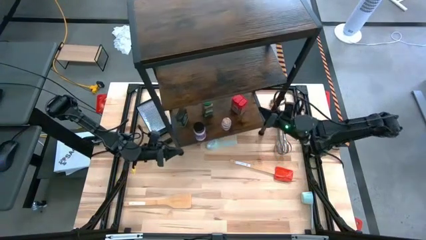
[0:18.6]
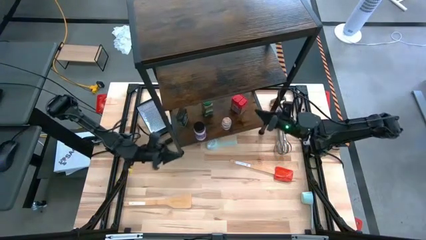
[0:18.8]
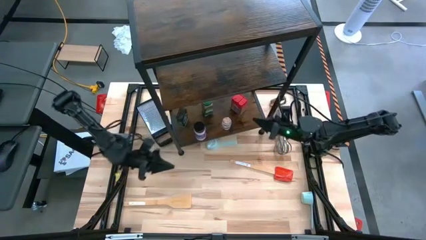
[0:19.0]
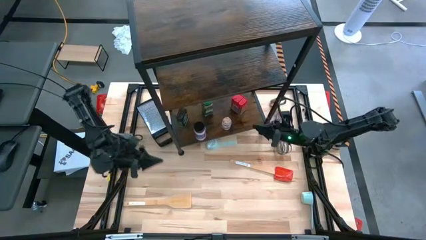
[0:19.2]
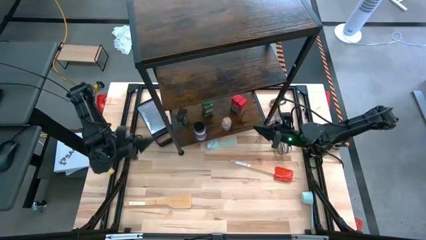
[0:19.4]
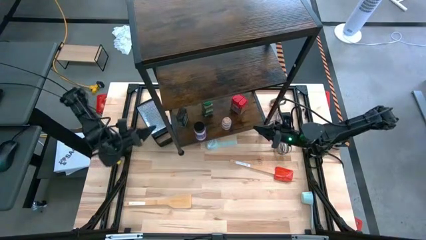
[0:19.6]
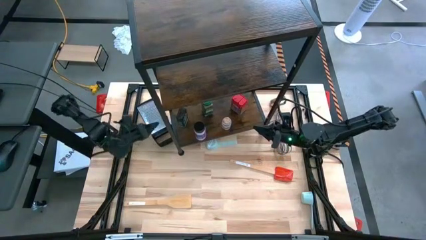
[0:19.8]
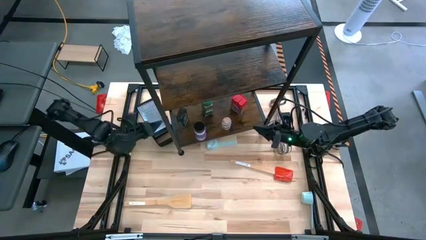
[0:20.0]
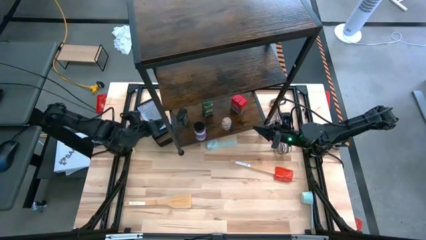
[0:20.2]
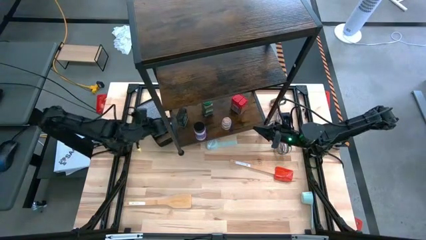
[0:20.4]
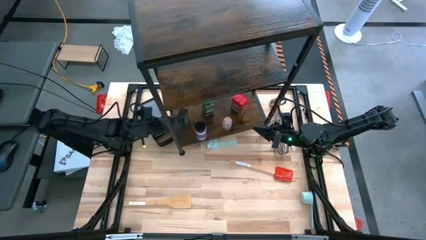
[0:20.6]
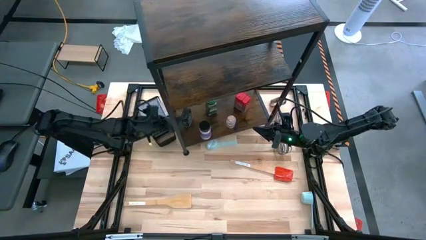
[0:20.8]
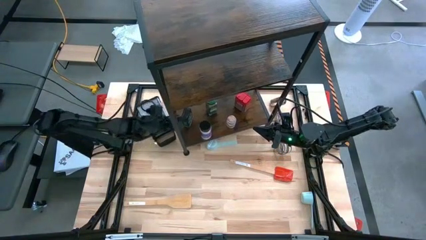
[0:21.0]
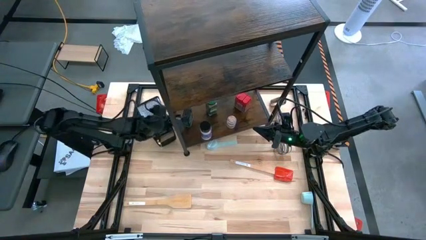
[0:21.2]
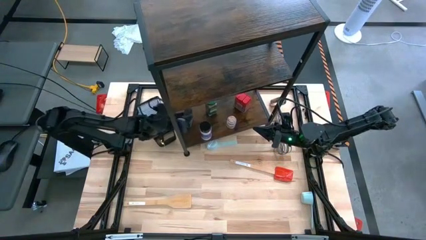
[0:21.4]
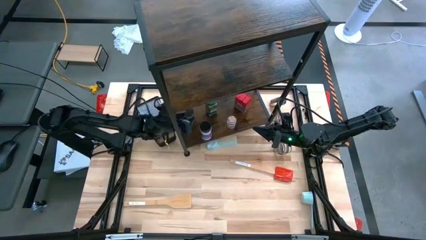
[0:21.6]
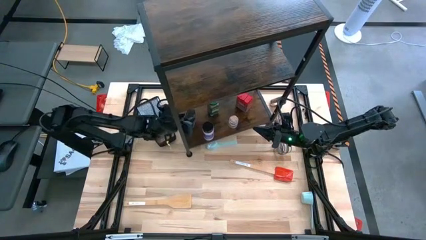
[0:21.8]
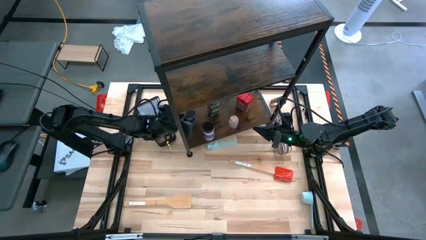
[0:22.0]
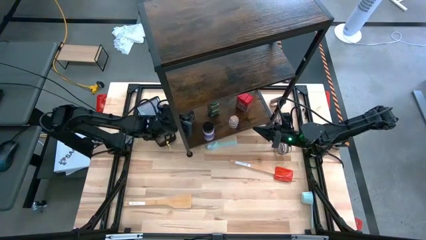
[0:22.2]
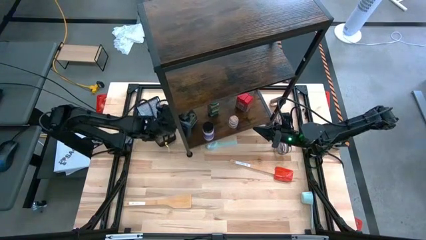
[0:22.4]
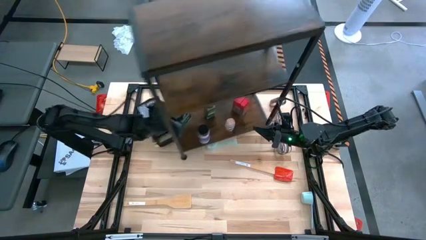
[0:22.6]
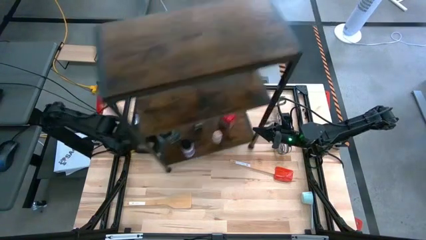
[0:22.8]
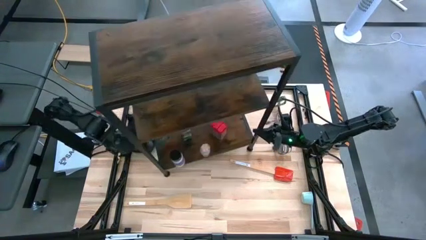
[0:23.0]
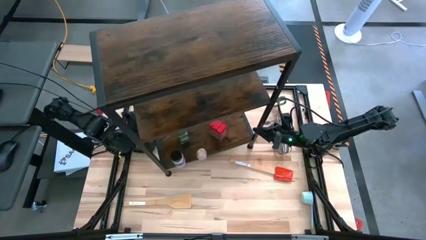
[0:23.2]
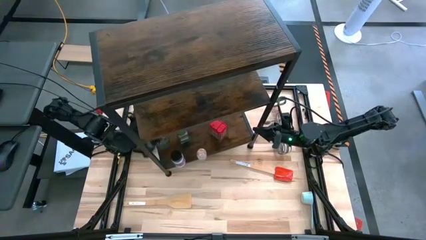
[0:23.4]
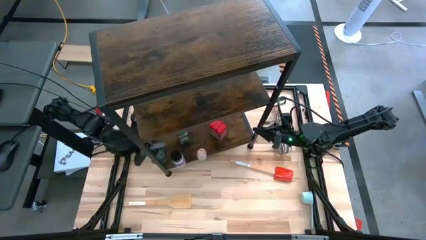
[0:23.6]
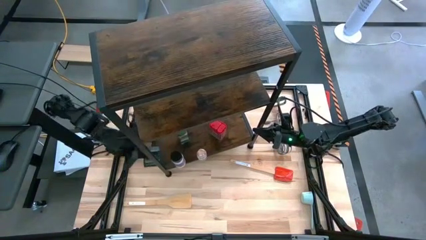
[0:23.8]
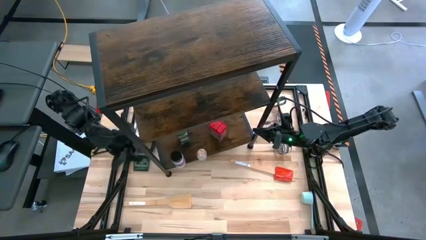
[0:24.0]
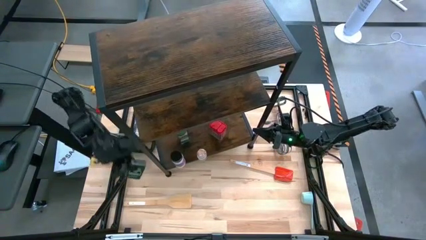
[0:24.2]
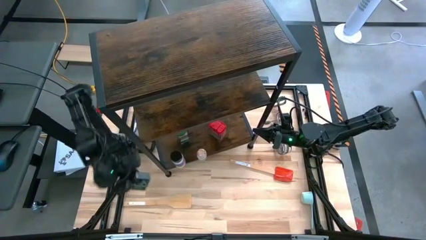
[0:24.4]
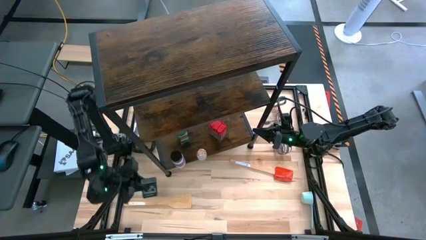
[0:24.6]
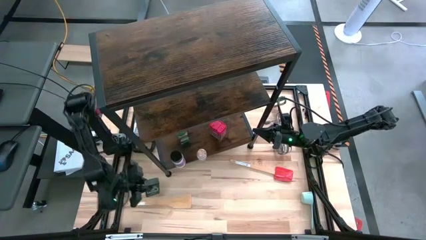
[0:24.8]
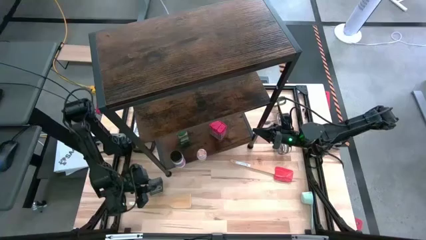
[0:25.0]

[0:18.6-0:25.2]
Task: Shelf spices
Remove the green seasoning can from the shelf

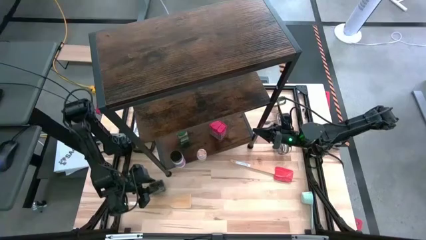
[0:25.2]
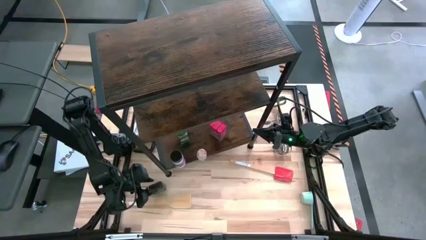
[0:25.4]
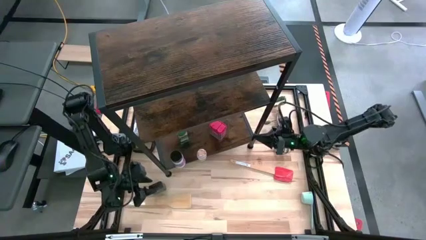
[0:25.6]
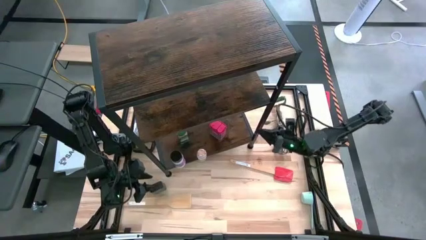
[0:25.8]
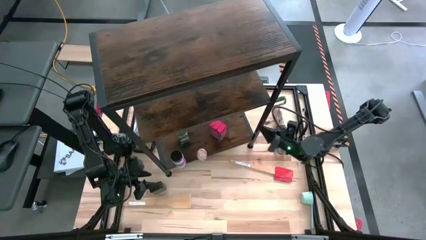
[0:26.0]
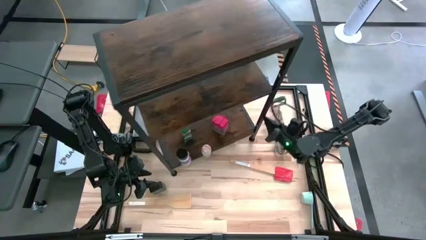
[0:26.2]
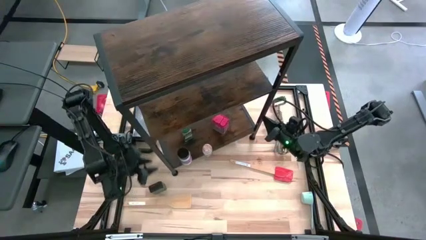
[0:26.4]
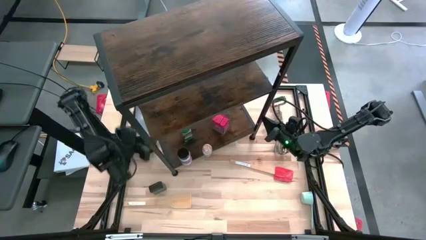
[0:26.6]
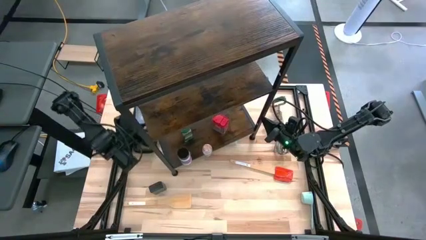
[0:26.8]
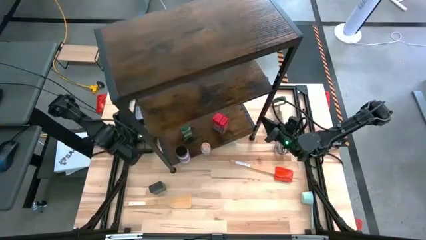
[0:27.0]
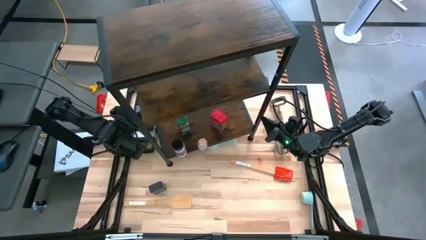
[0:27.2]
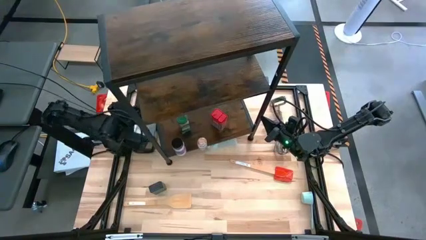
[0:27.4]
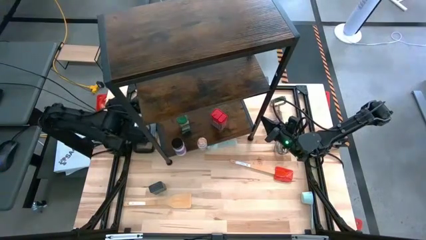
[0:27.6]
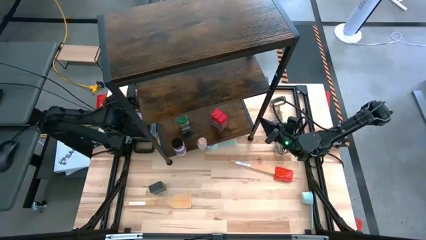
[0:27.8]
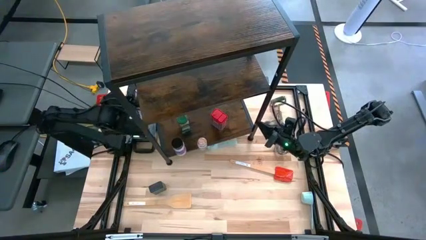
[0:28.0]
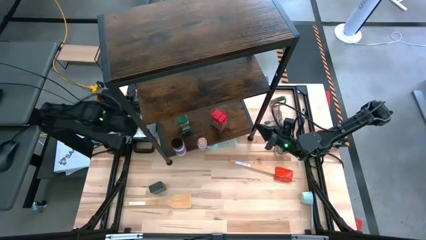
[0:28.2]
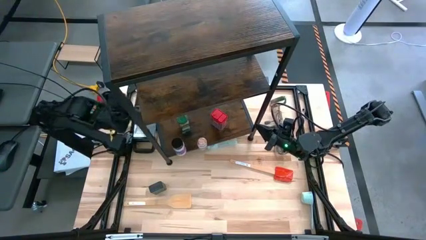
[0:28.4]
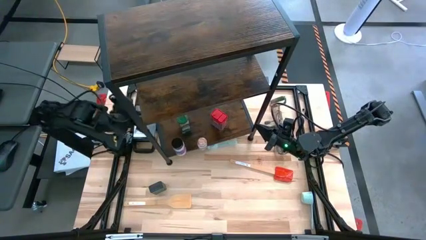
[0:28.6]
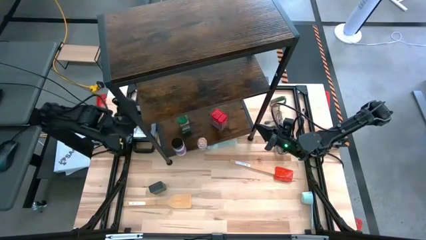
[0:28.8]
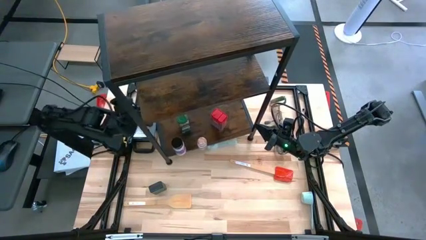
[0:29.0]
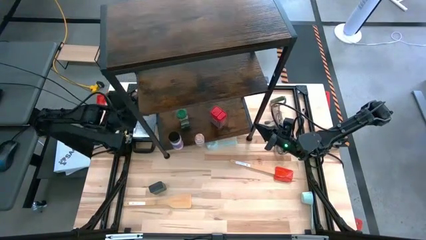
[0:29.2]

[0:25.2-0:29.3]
Adjust the shelf on the table

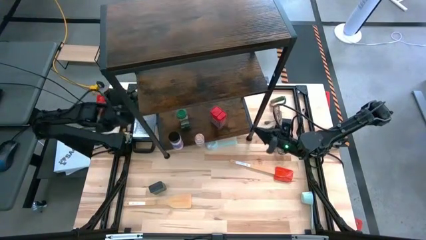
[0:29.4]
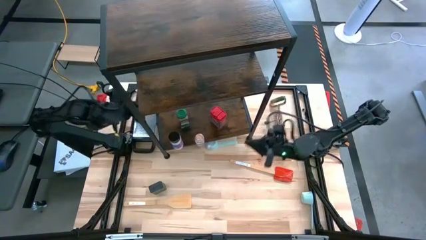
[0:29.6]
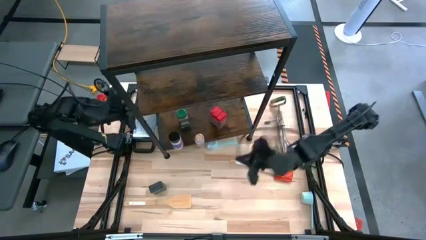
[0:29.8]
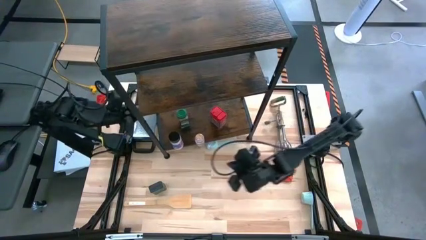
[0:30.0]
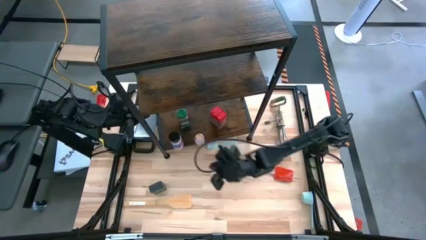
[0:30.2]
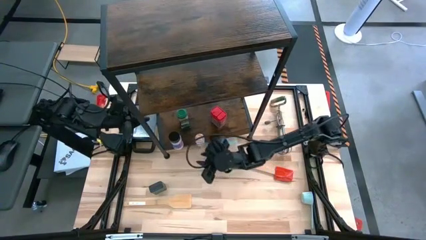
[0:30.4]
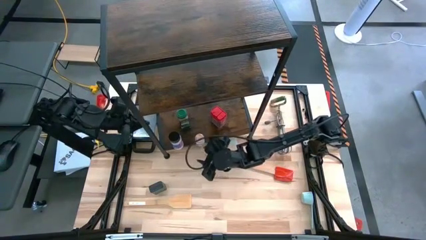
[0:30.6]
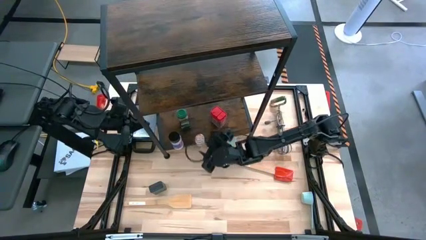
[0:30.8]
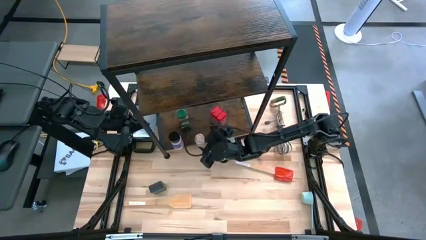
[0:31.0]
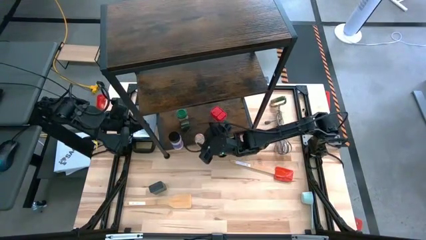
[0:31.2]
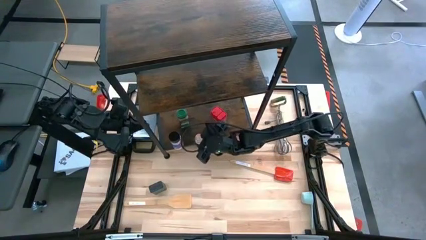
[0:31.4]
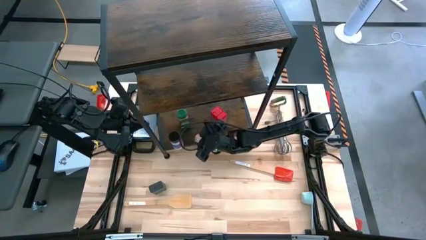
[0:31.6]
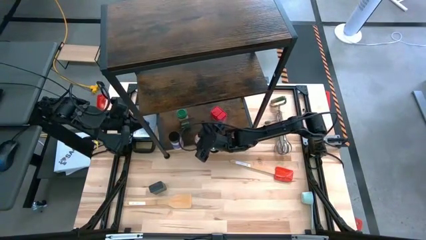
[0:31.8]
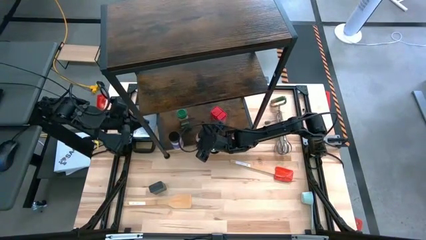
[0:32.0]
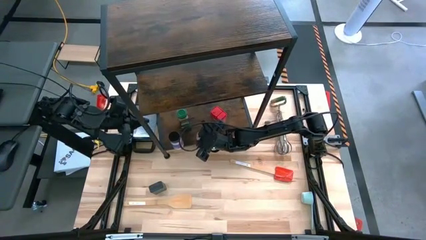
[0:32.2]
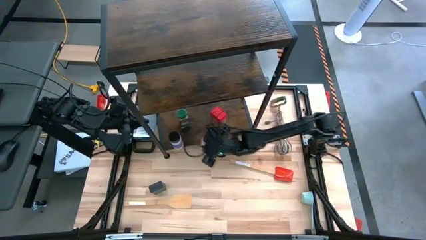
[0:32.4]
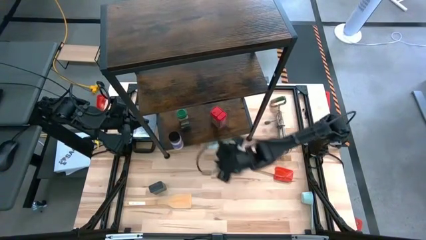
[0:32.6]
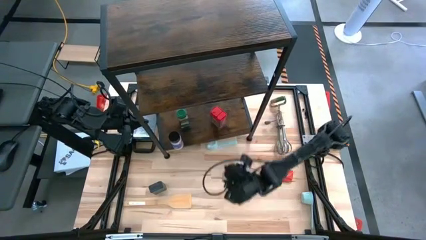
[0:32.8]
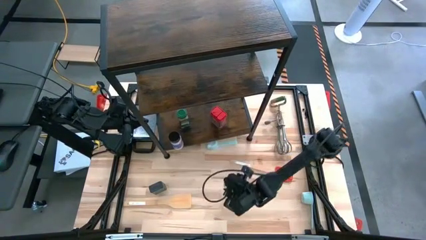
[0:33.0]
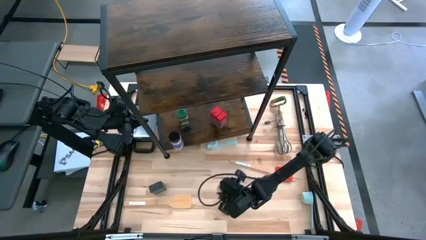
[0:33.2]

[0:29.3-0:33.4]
Remove the brown seasoning bottle from the shelf
